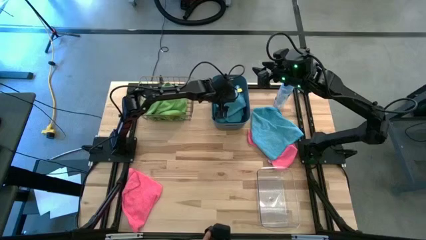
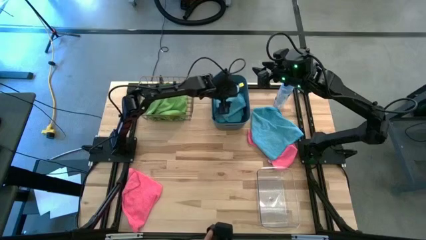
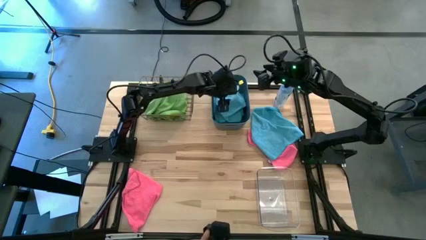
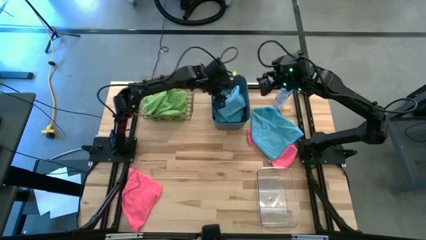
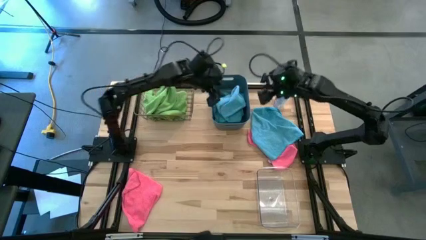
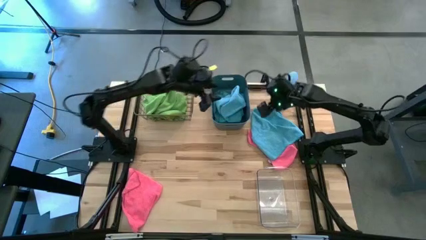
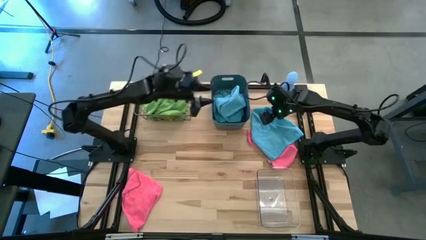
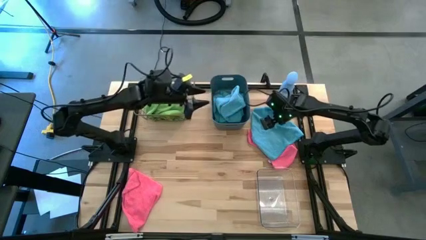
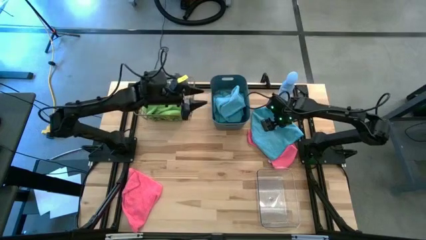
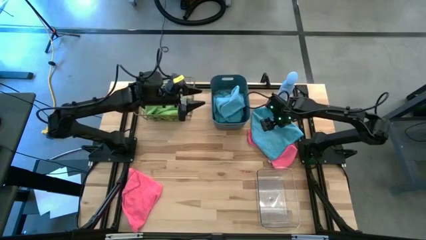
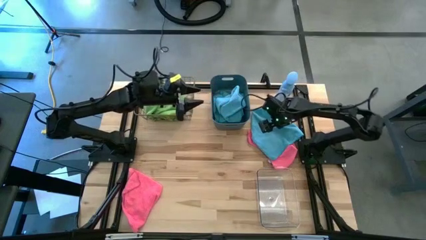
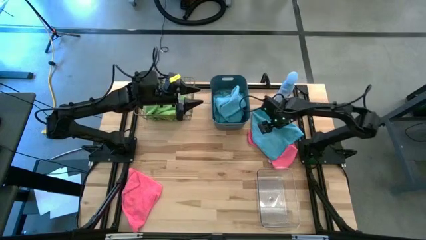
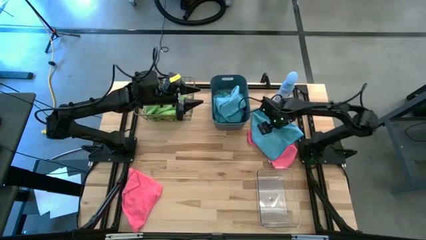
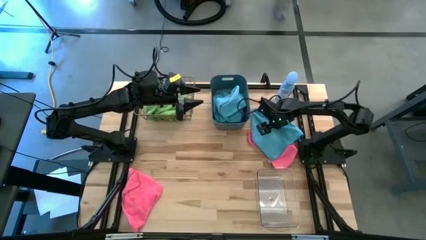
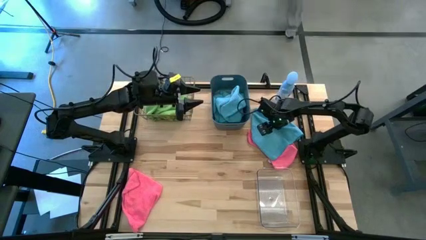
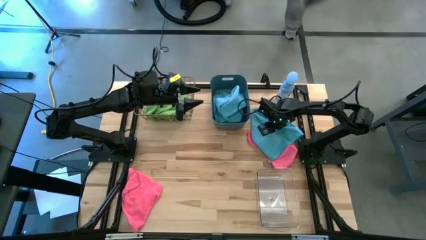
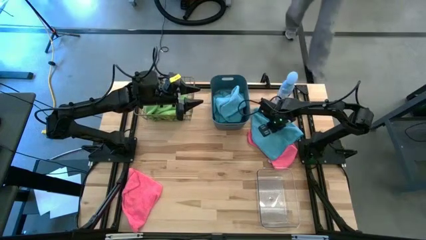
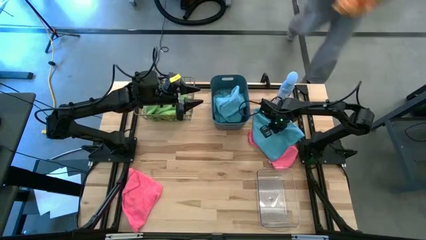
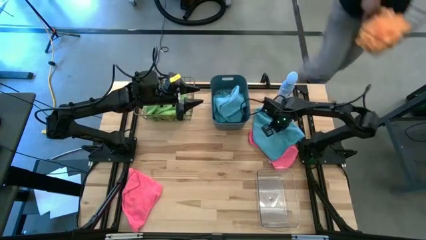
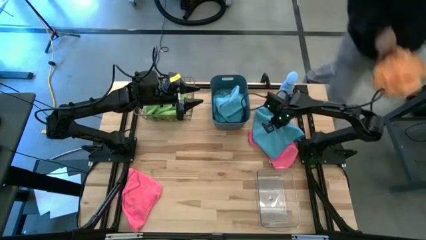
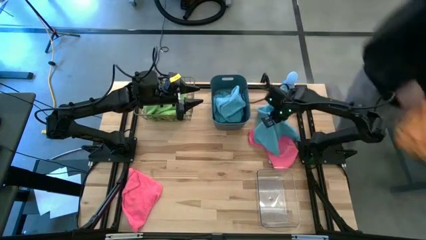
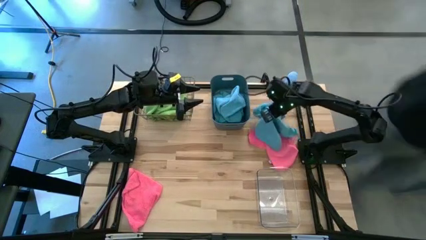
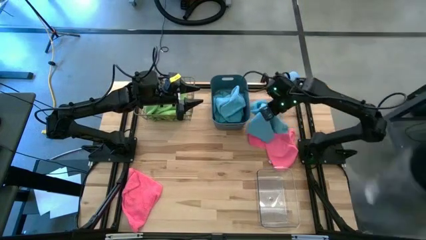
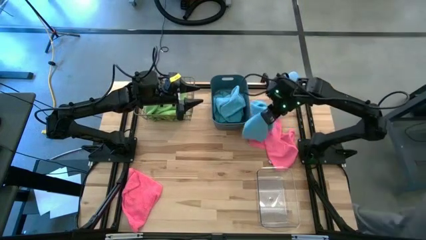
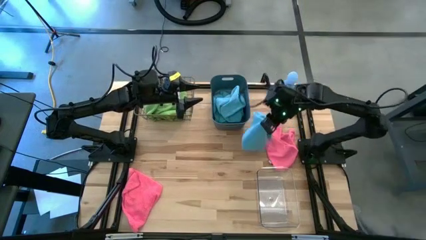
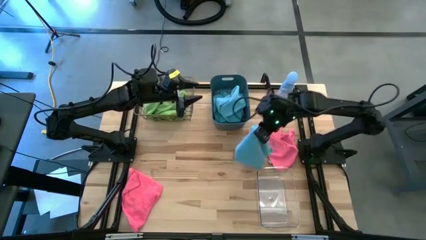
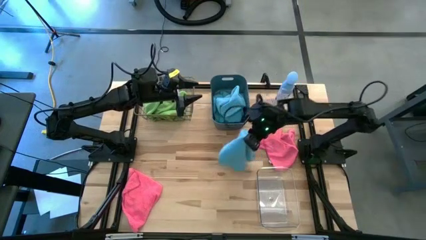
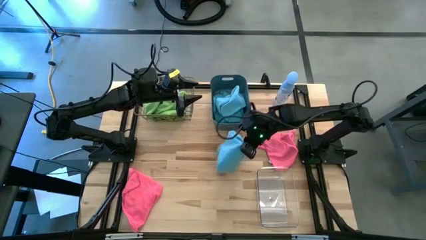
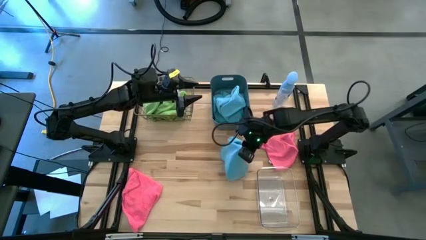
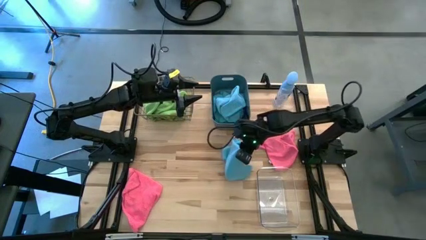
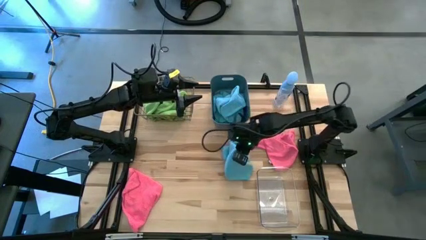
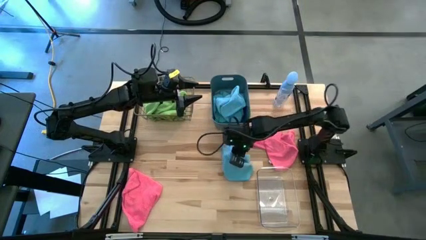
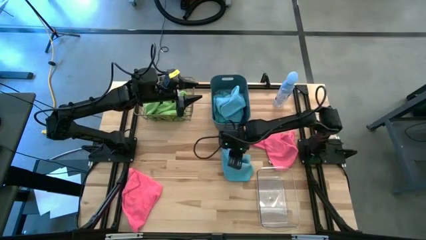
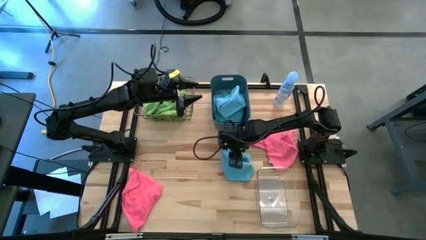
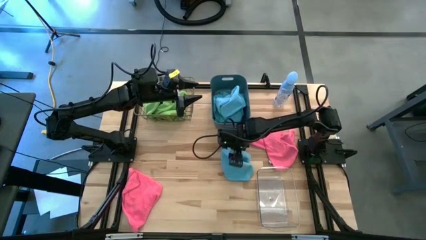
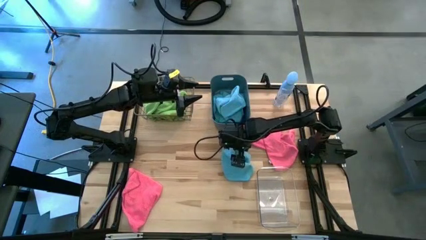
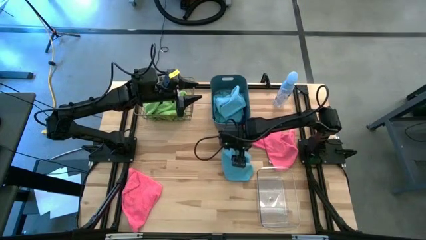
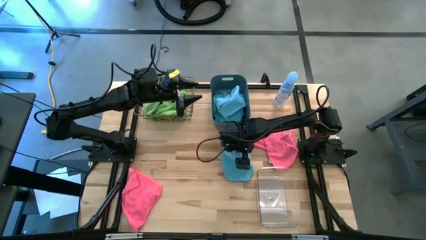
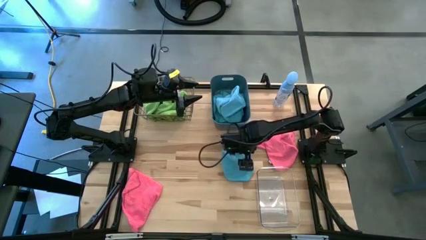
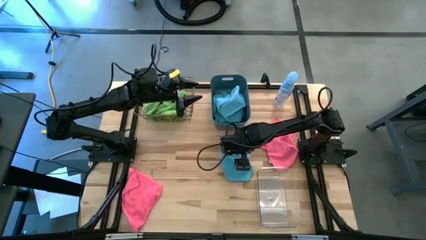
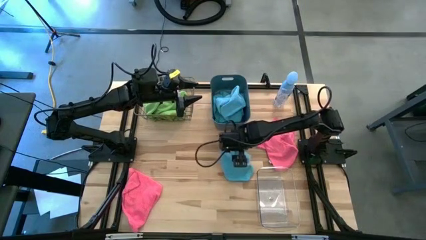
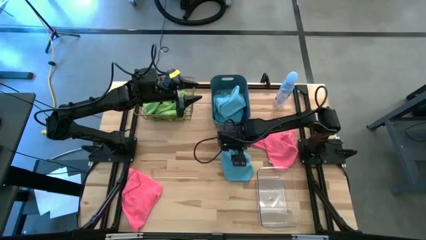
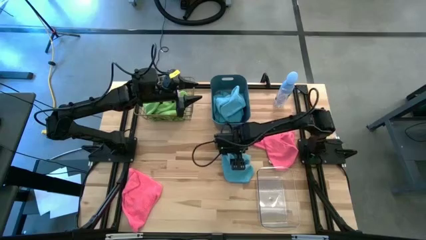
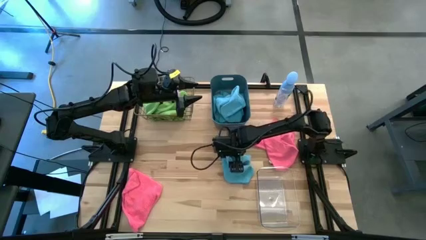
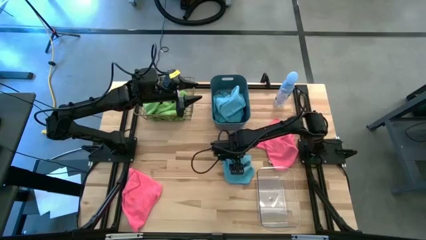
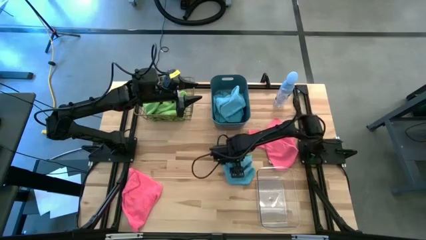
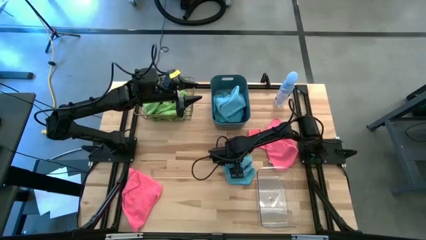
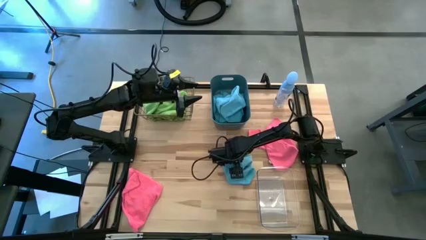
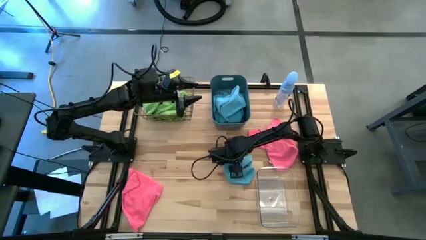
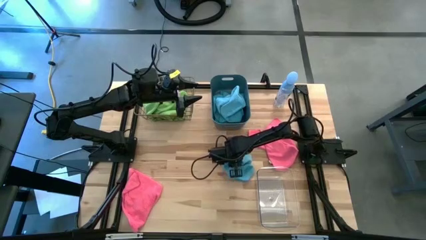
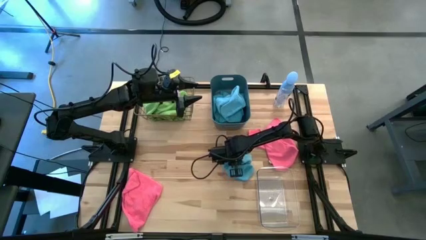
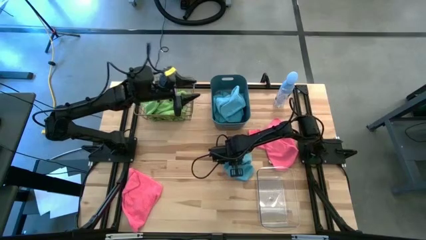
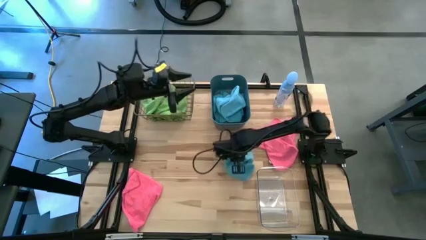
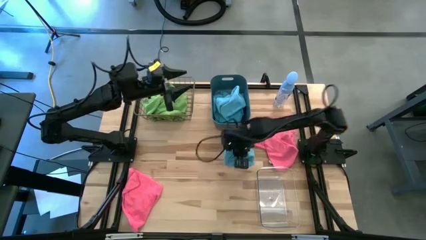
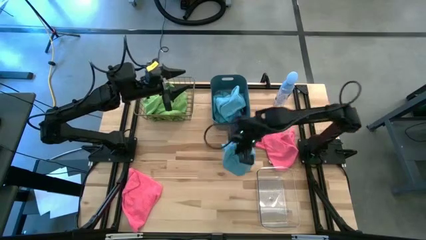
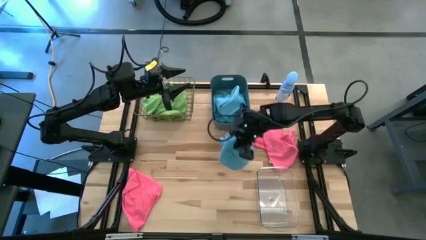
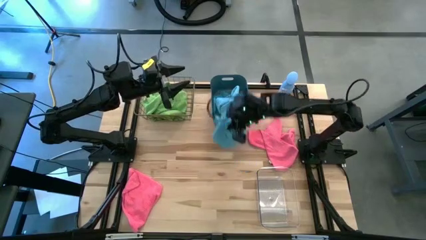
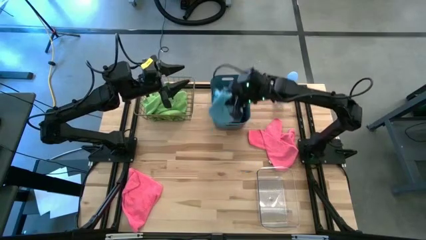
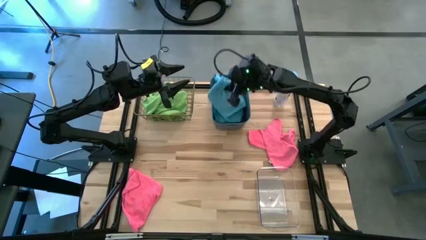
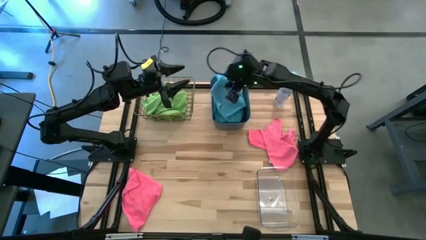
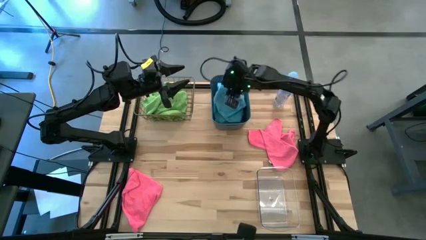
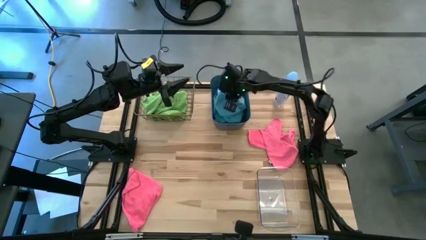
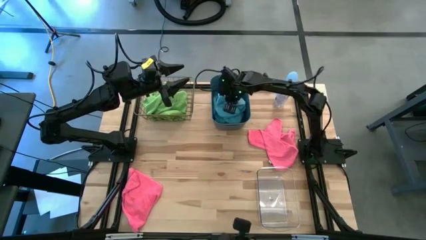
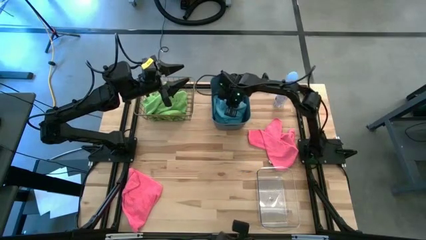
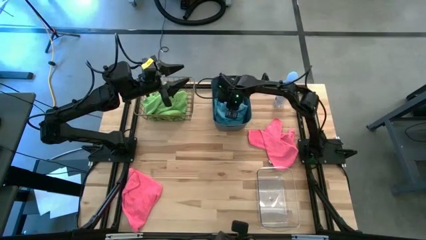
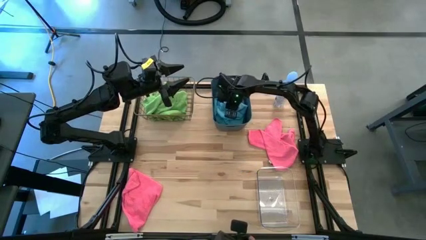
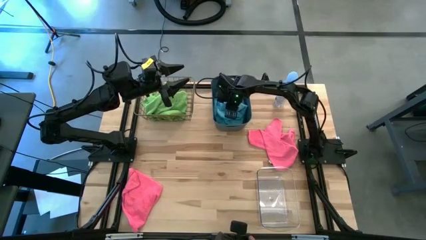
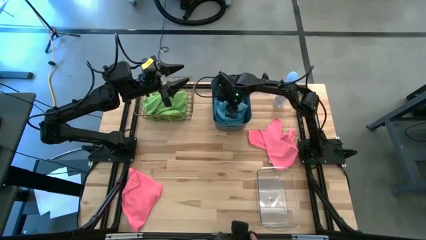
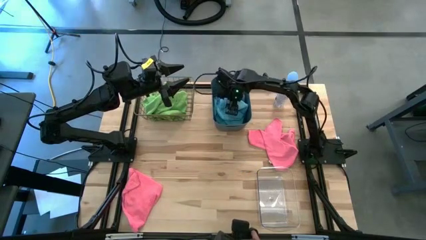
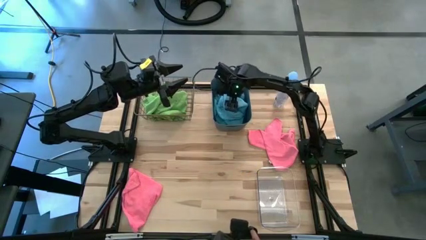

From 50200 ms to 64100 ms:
Task: Sort microfiber towel by color & place in baskets
Put the blue microfiber cloth into the blue bin

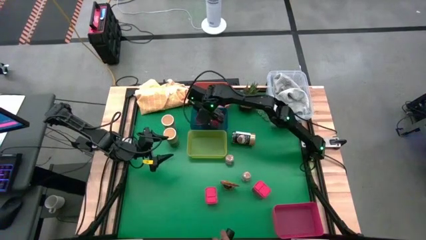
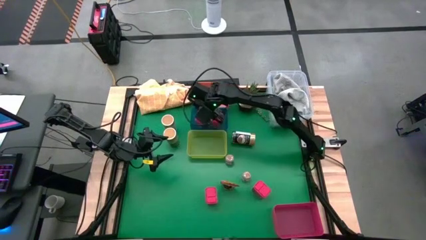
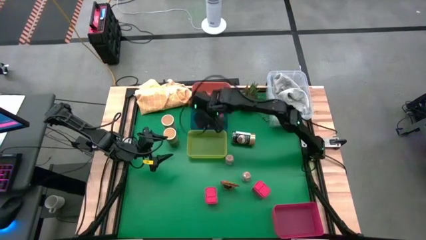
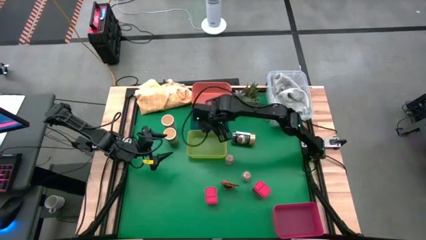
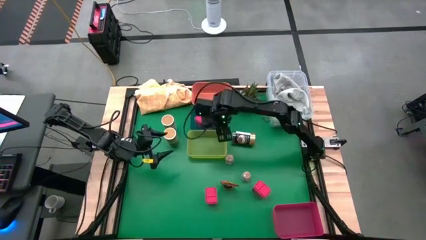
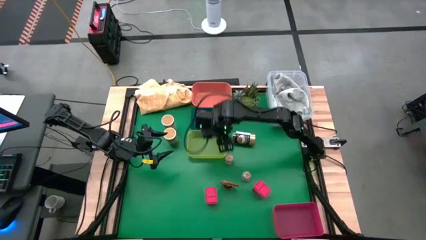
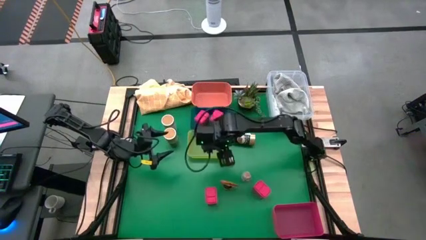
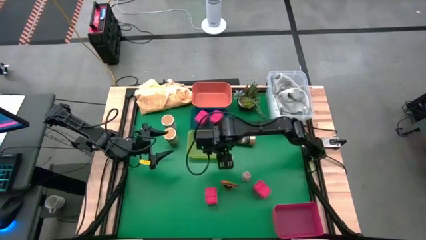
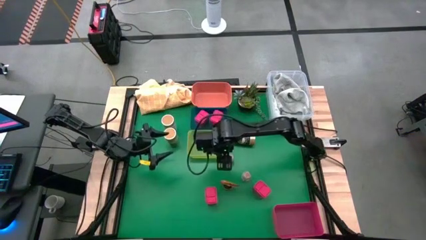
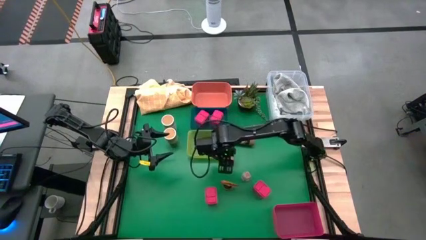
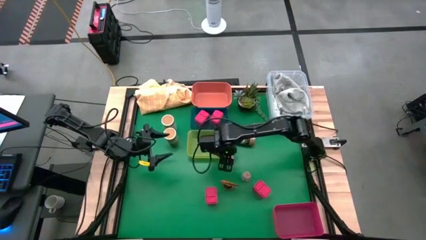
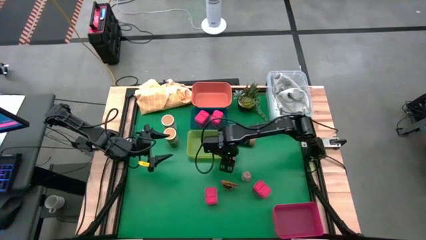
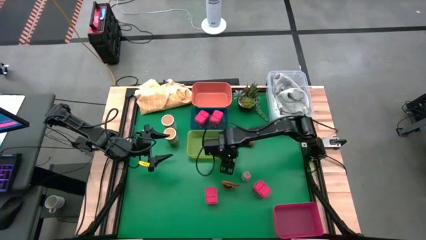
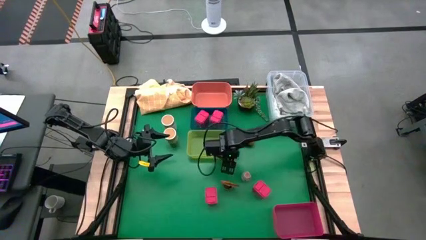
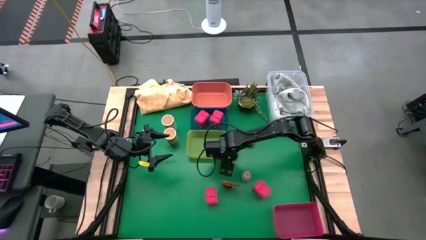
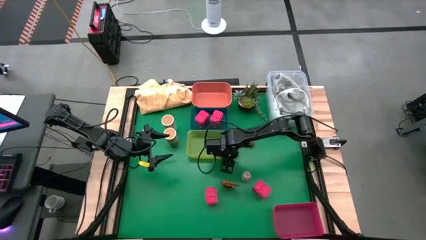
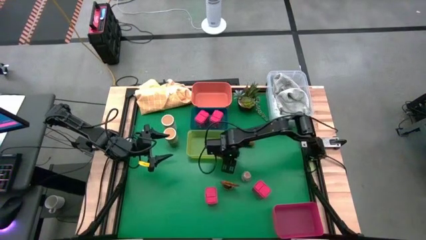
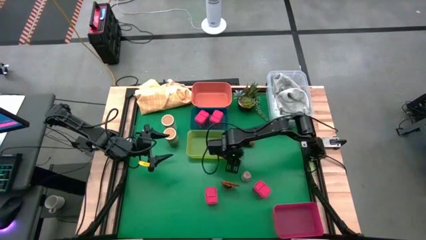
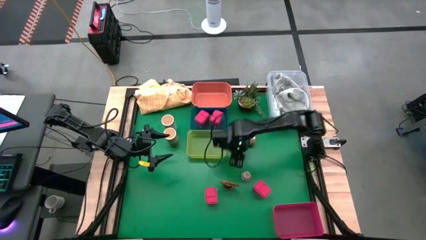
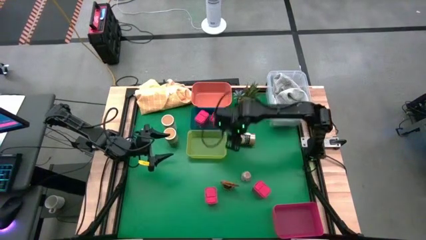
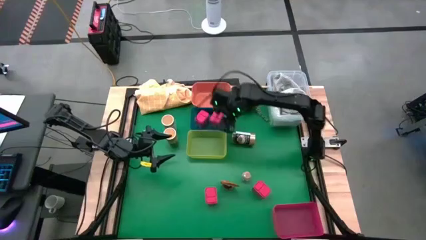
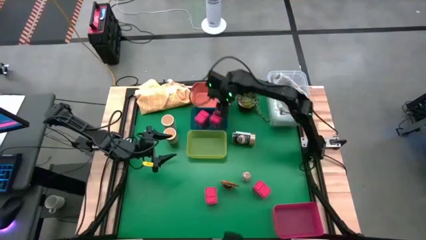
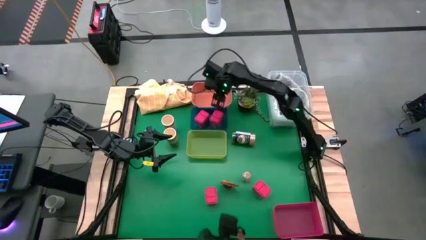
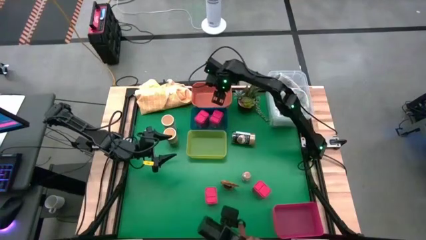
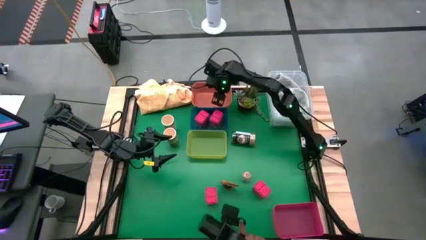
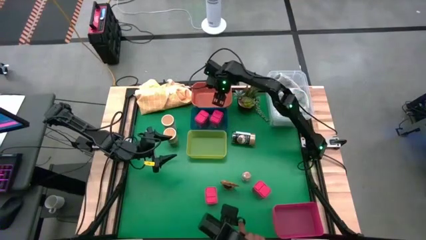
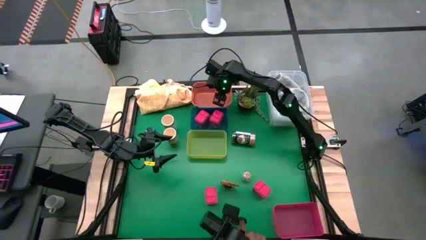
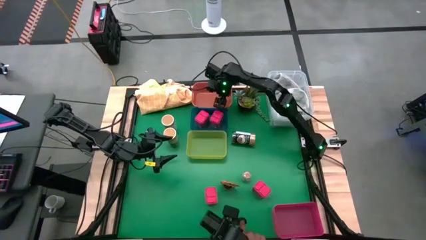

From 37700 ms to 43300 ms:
Task: Sort spices by type
Put the brown seasoning bottle into the orange bin
